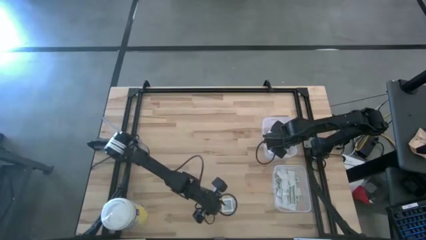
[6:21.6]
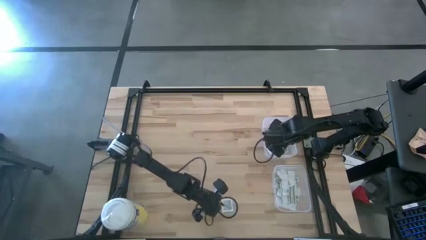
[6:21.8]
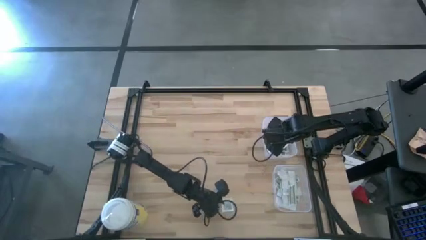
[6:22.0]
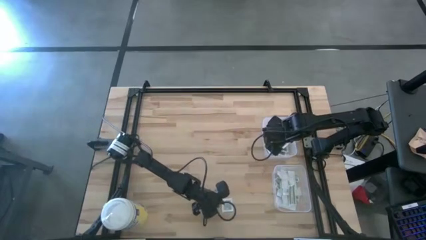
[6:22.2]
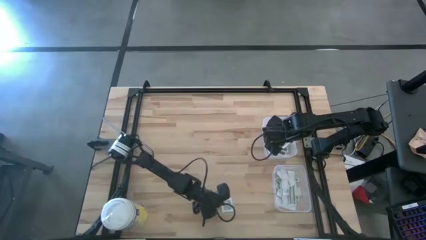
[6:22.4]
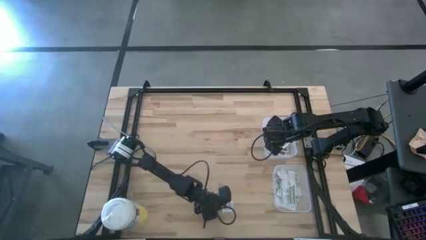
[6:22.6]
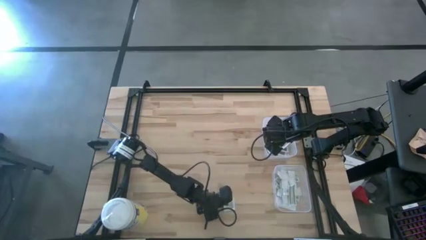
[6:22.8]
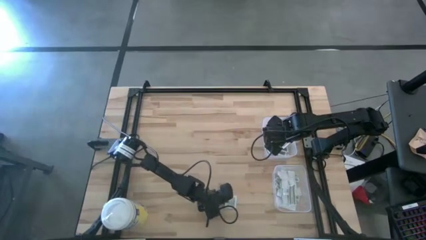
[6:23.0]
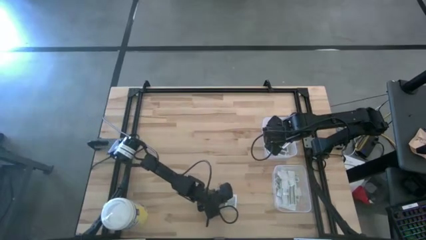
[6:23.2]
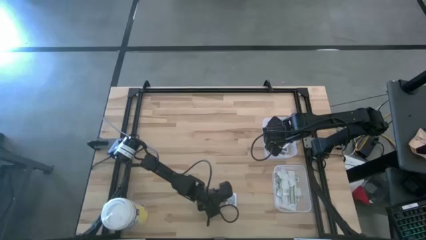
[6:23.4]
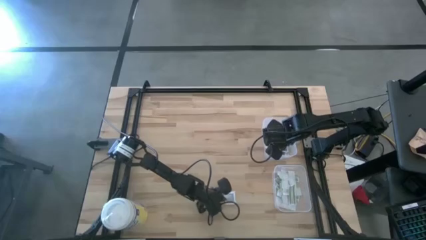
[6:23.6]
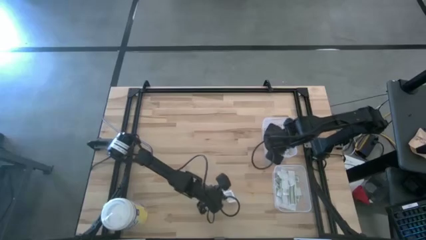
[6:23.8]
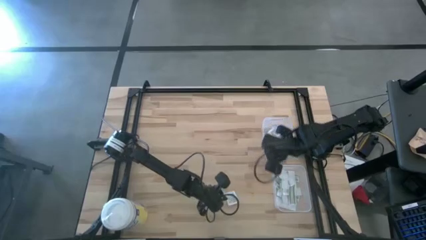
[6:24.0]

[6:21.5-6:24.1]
Task: Pick & Place First Aid Supplies
Put the towelette pack into the top bin

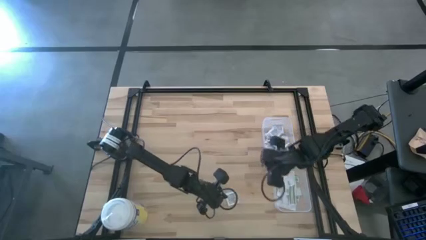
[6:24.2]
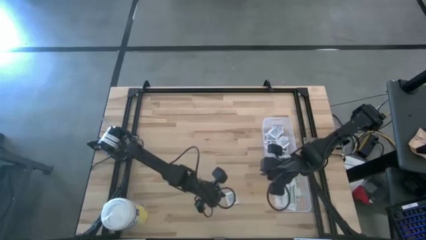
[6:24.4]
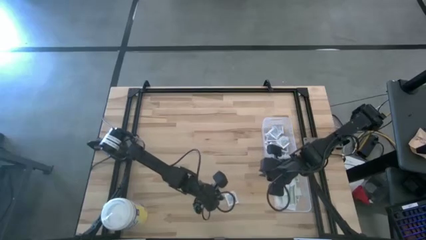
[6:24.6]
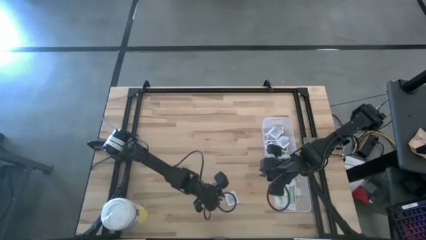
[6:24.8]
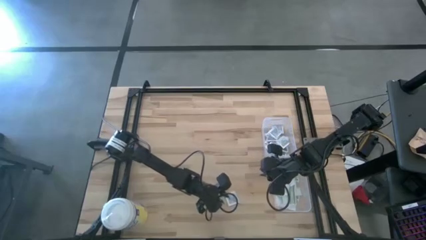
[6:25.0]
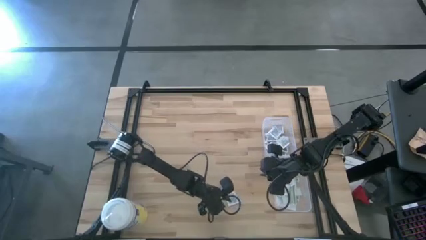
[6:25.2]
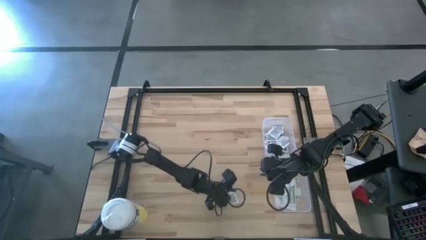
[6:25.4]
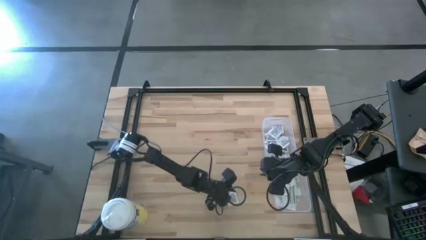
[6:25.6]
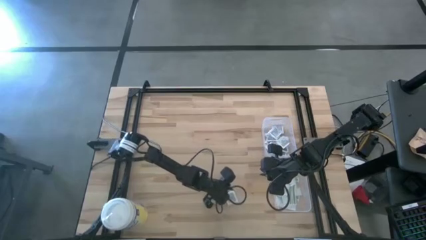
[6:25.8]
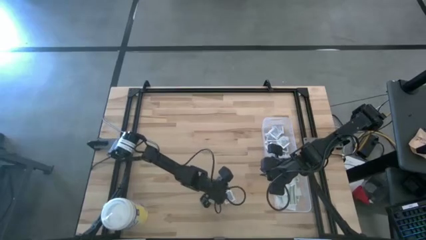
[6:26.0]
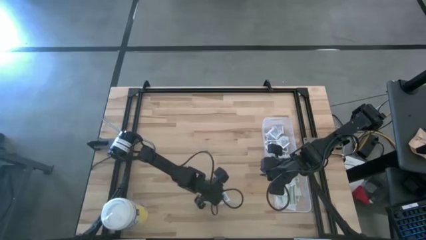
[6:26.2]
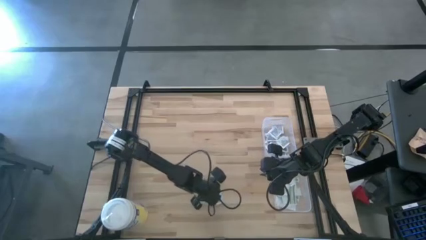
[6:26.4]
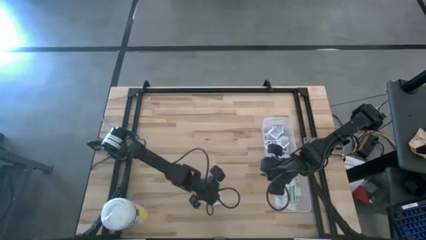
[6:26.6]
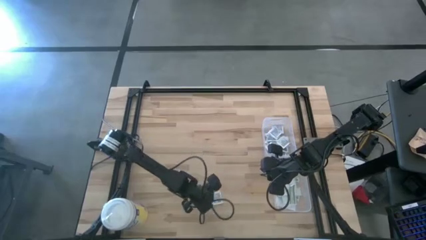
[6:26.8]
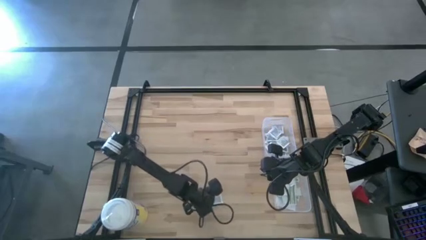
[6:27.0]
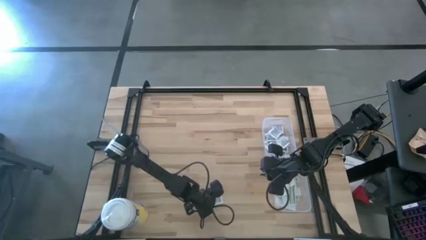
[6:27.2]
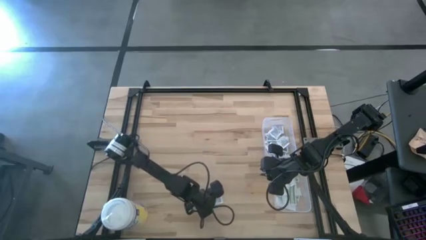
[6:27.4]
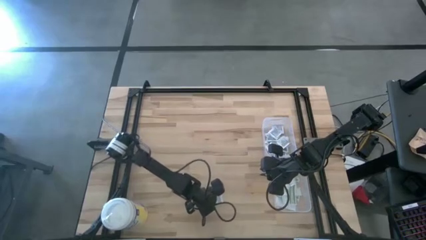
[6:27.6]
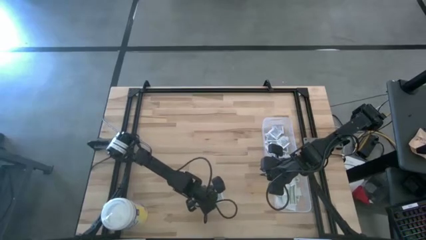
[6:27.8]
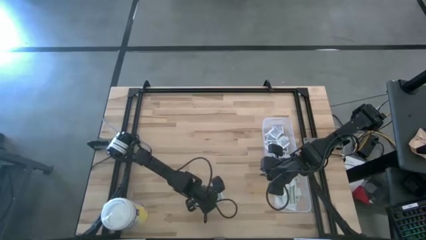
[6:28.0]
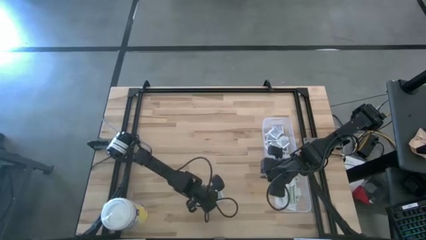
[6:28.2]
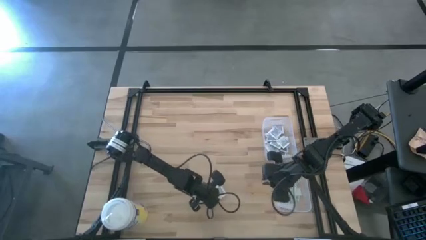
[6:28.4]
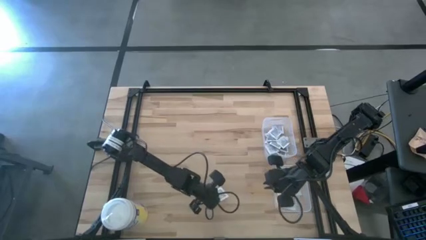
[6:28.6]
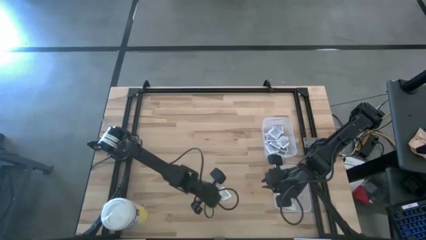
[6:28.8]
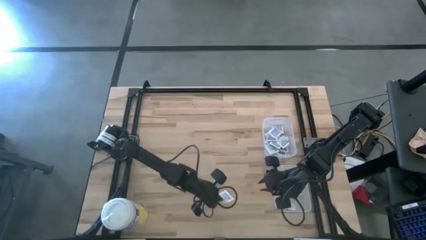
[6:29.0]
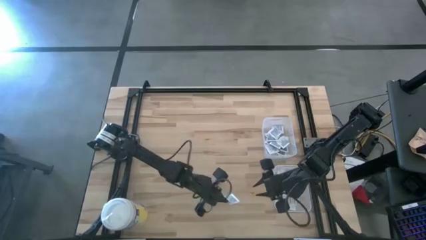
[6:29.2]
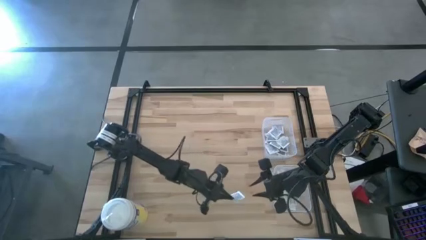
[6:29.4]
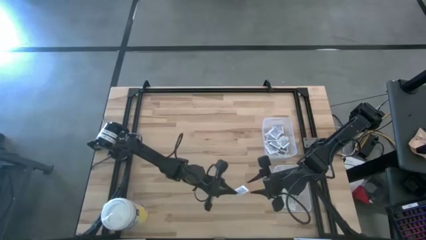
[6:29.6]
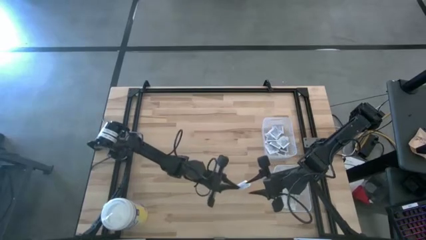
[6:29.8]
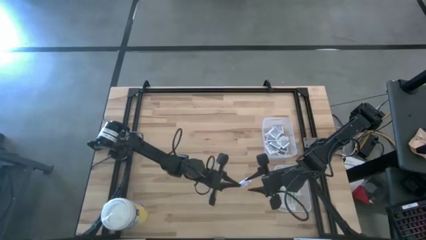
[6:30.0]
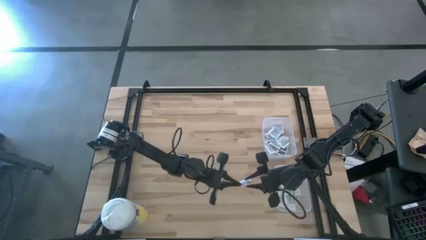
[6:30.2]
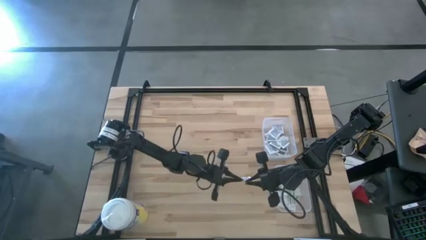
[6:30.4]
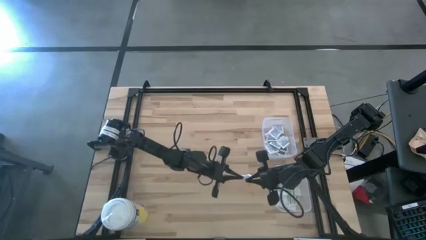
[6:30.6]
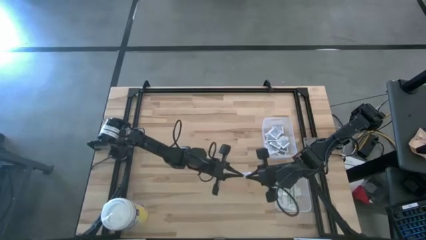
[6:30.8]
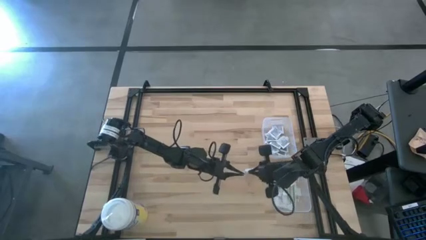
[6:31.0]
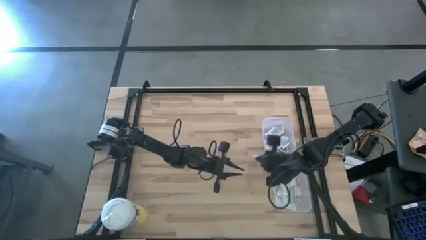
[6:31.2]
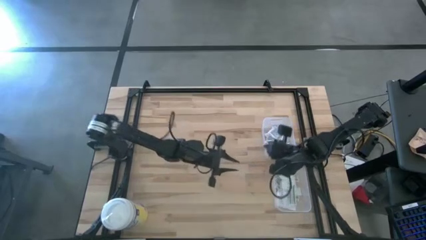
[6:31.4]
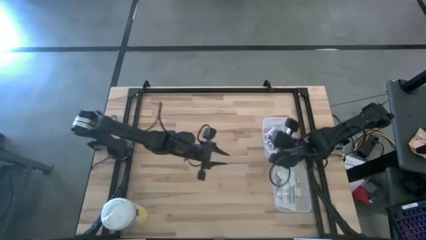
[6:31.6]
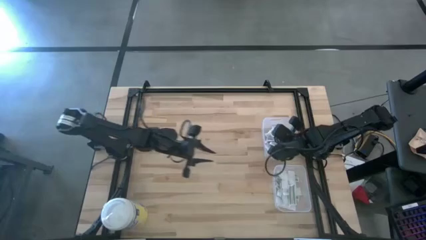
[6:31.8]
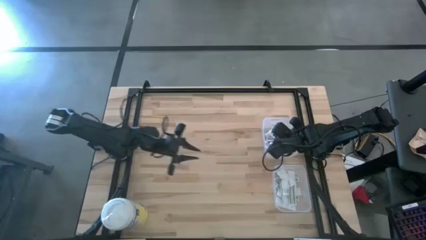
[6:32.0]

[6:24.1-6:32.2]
Put the towelette pack into the top bin

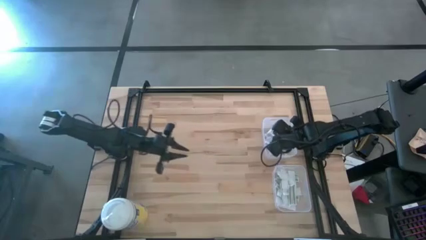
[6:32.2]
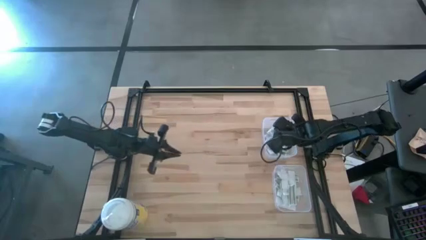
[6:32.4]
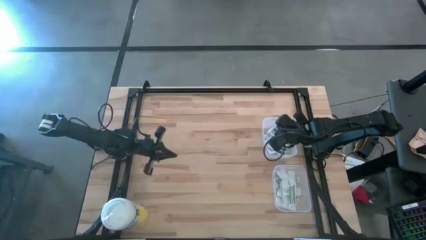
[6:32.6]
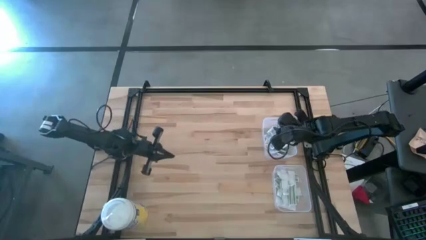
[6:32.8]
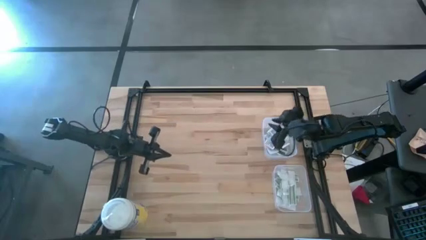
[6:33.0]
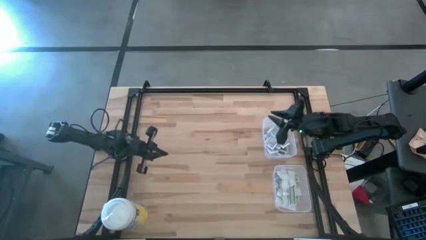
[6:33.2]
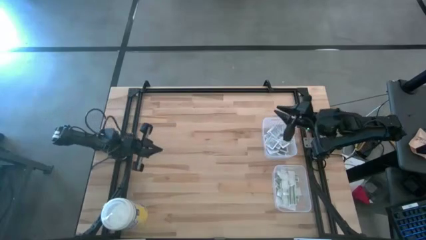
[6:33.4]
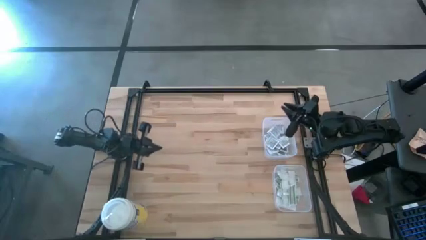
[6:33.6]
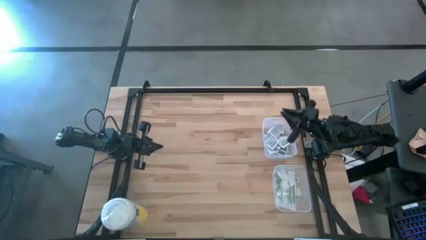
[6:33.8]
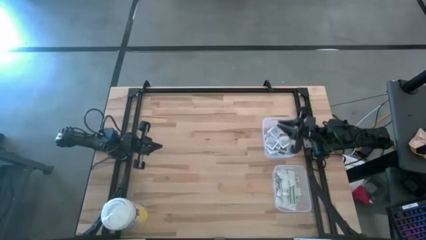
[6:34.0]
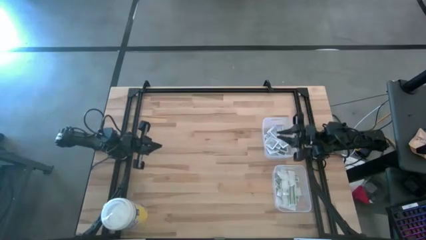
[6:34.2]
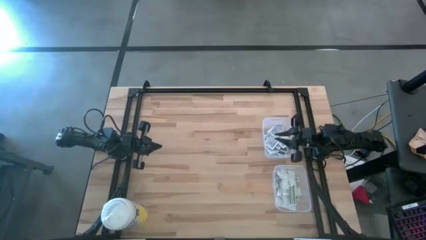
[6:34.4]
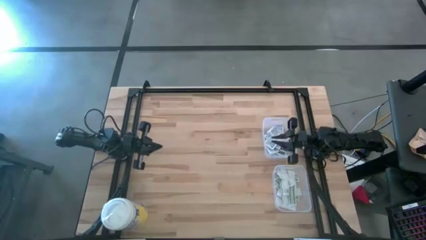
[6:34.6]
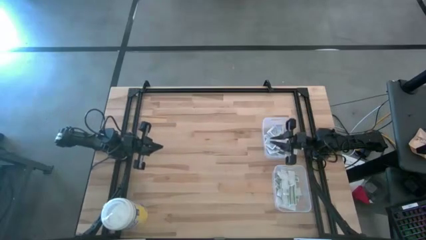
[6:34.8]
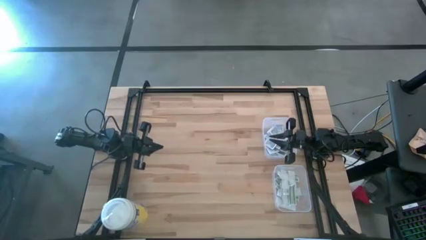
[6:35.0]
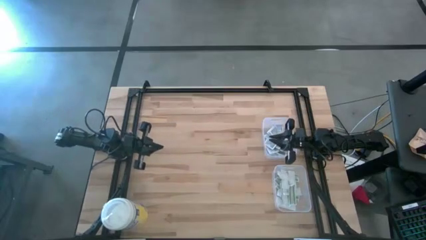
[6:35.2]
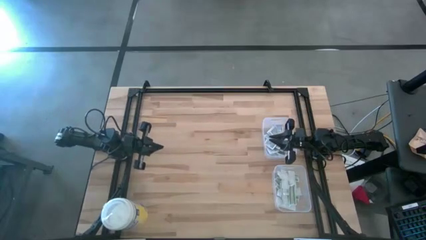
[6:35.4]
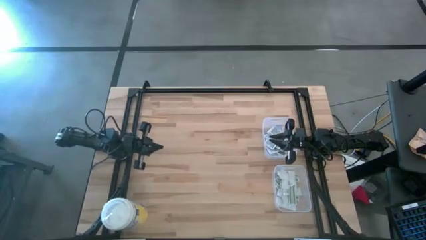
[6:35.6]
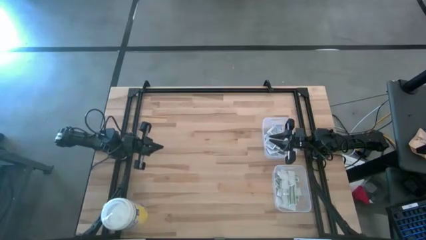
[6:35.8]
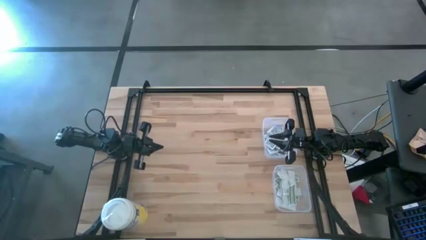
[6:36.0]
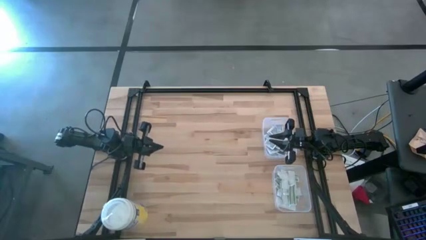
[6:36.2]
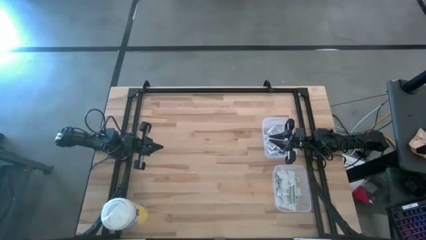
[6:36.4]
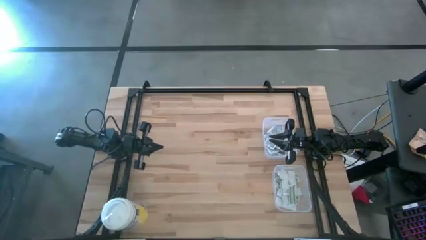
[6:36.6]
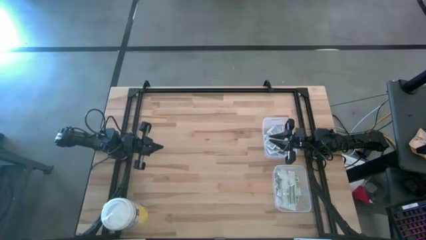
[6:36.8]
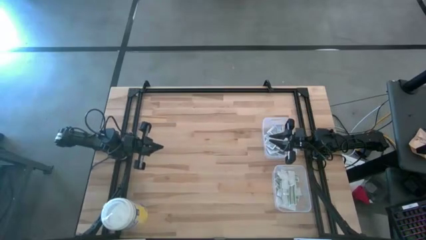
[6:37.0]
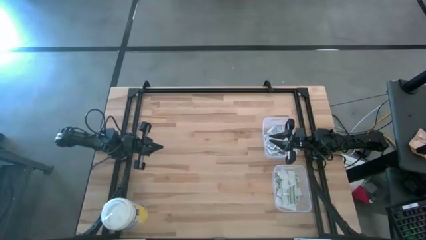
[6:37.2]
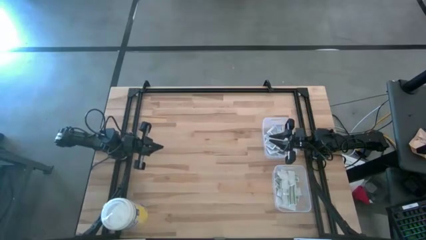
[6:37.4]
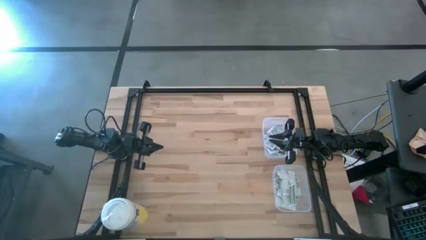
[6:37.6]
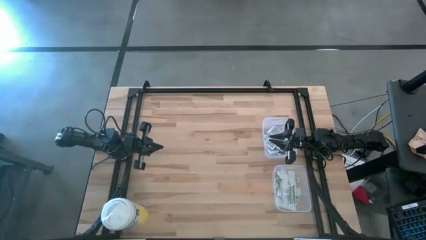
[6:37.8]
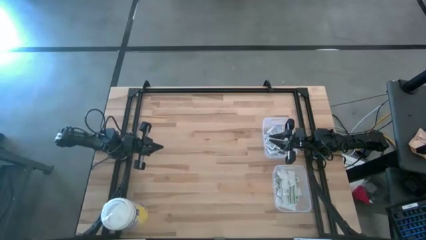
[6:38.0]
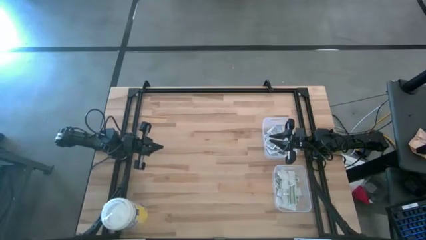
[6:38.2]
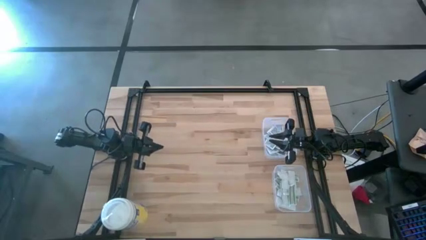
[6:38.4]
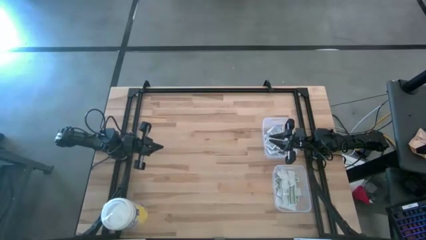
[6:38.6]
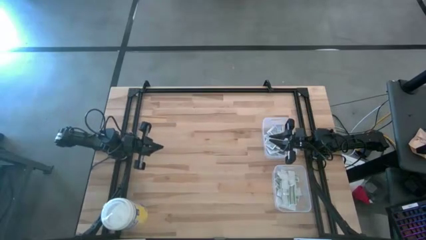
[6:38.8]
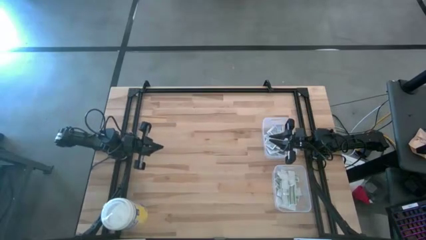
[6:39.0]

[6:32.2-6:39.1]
Return to Home Position
